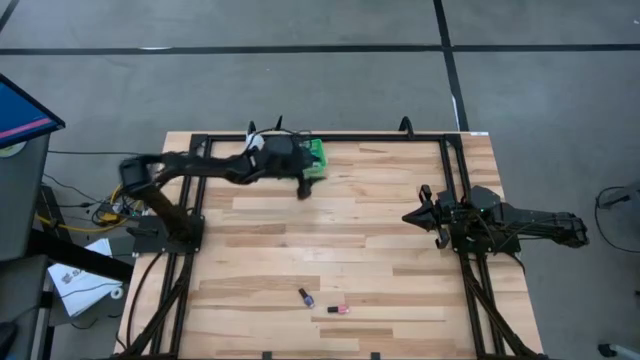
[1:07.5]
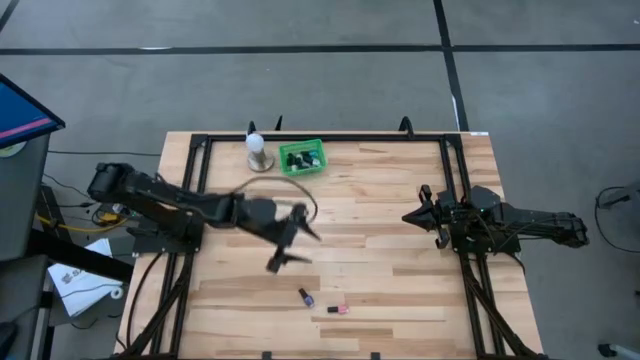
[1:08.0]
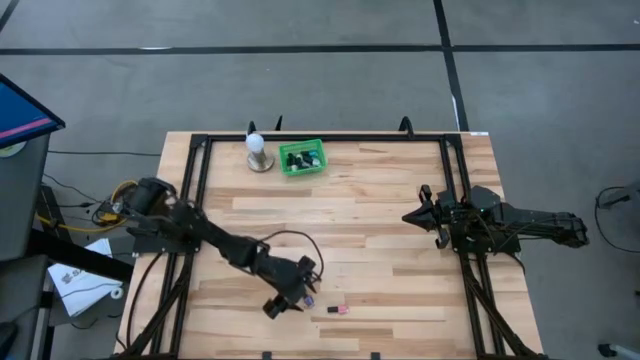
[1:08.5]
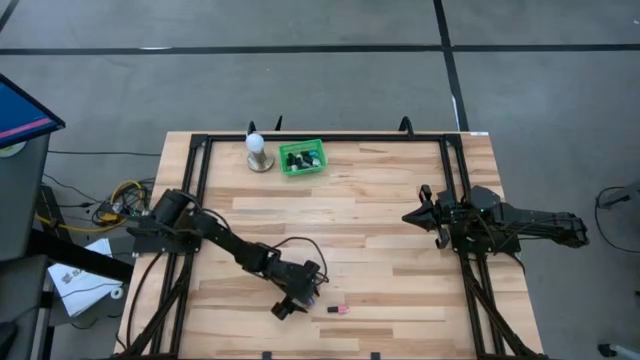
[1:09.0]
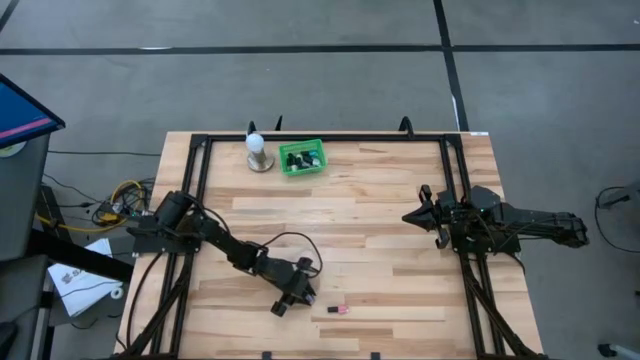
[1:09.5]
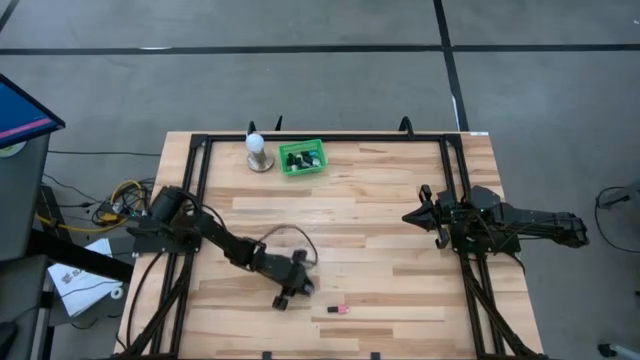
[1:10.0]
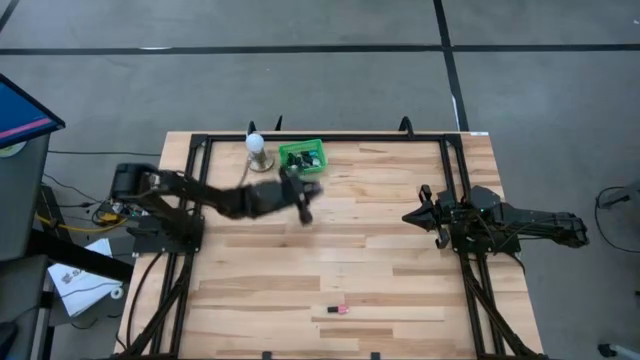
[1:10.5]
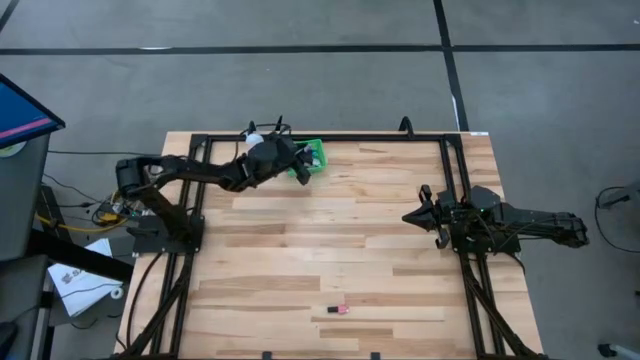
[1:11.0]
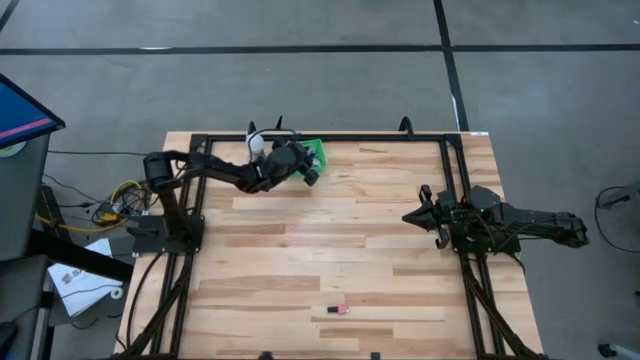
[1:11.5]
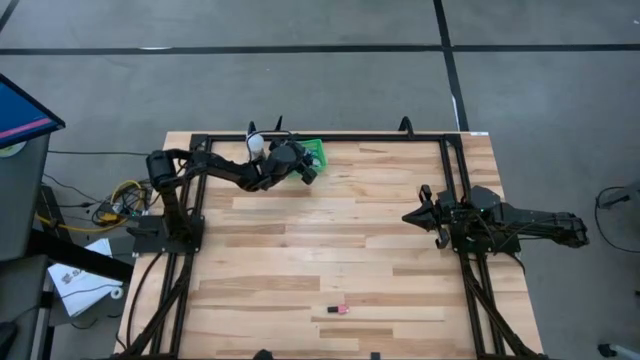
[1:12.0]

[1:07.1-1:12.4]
Task: Pick & Place Nail Polish
Put the violet nail polish into the green bin

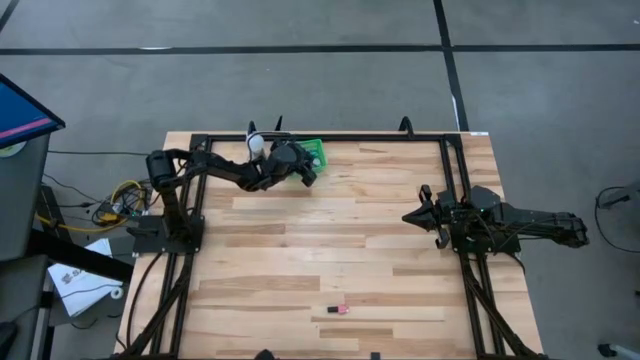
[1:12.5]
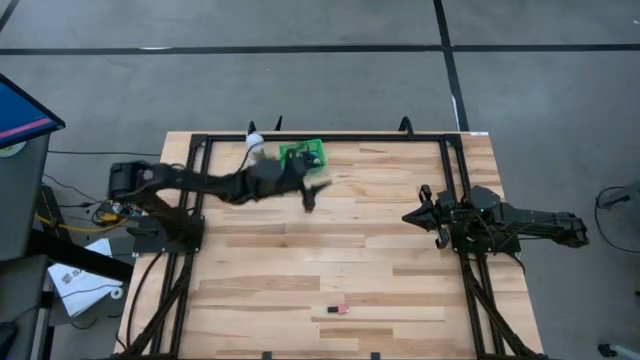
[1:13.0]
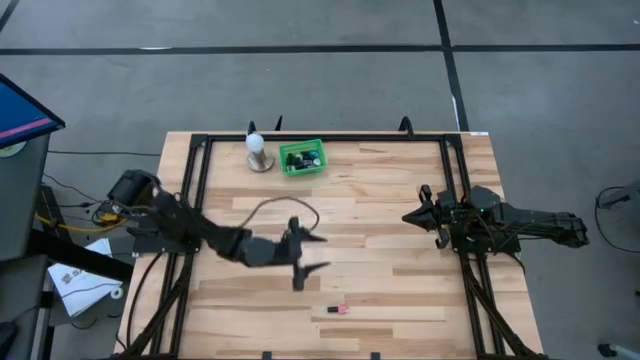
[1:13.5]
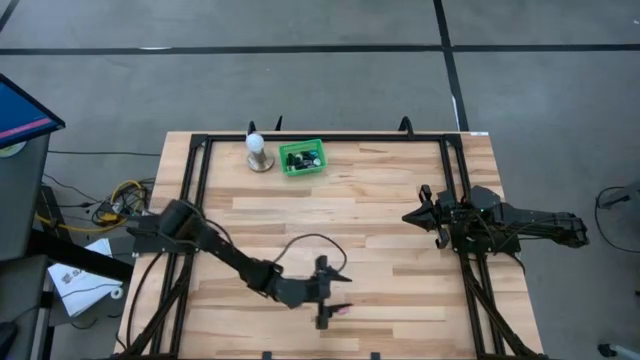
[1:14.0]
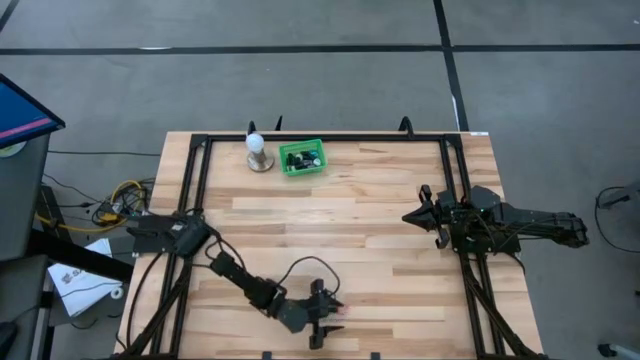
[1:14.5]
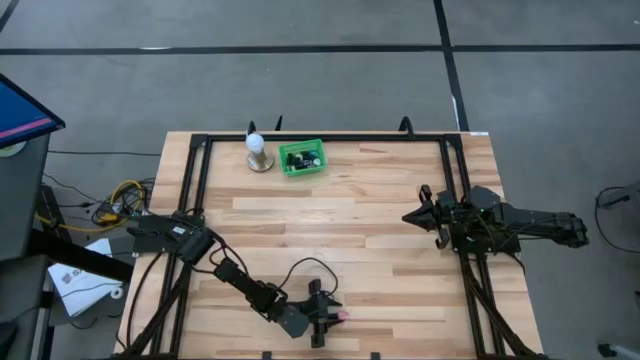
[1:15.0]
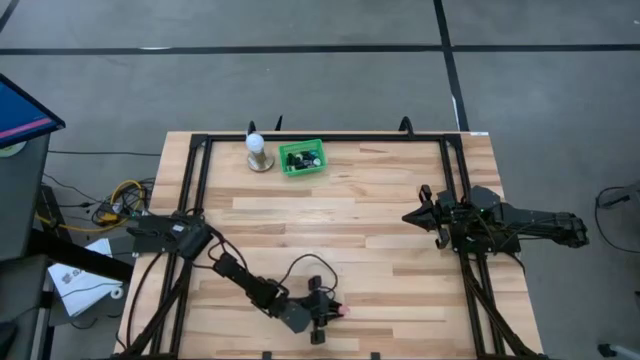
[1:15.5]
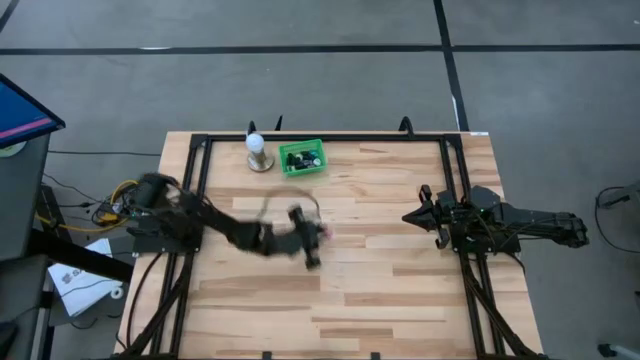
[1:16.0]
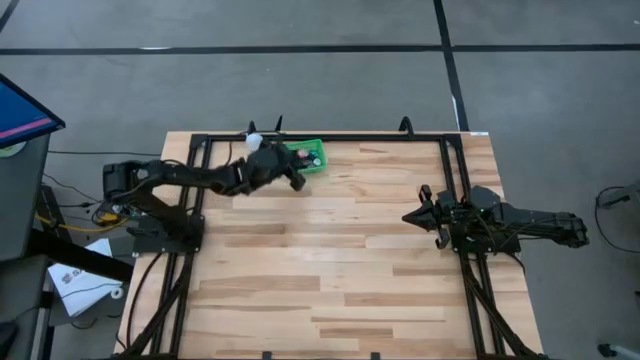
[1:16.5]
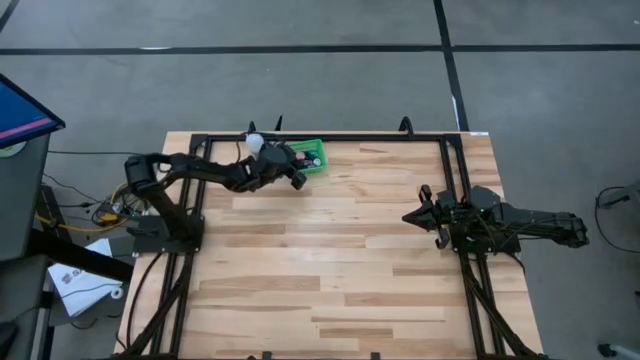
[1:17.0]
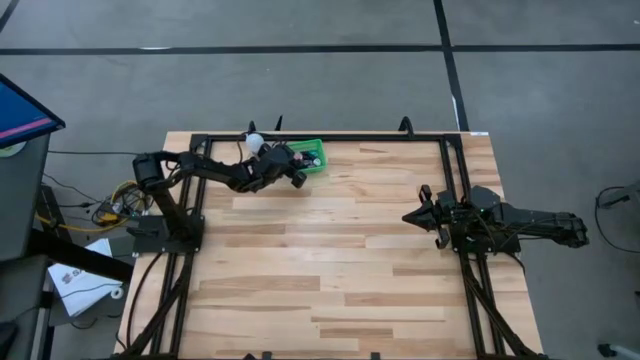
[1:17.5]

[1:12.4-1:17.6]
Put the pink nail polish into the green bin

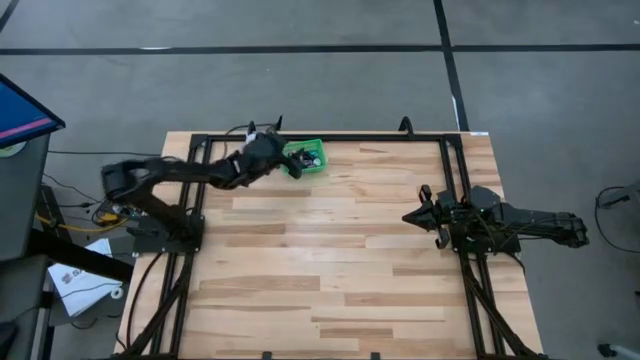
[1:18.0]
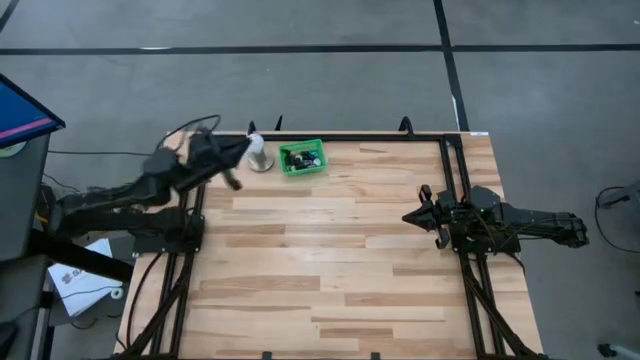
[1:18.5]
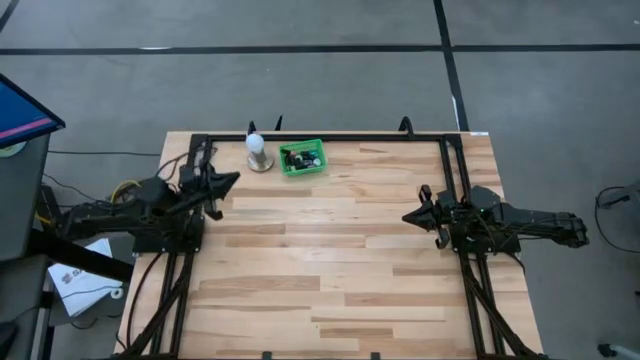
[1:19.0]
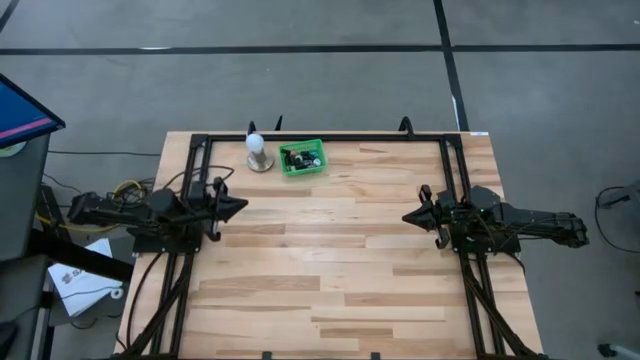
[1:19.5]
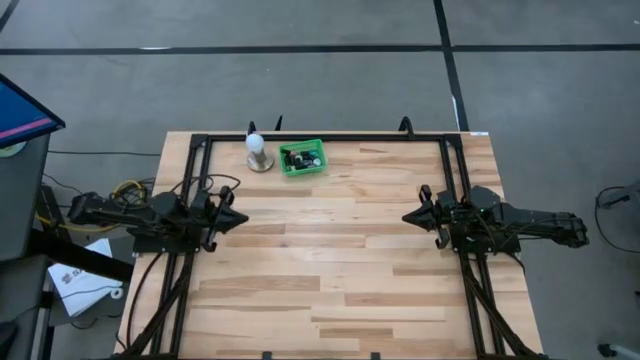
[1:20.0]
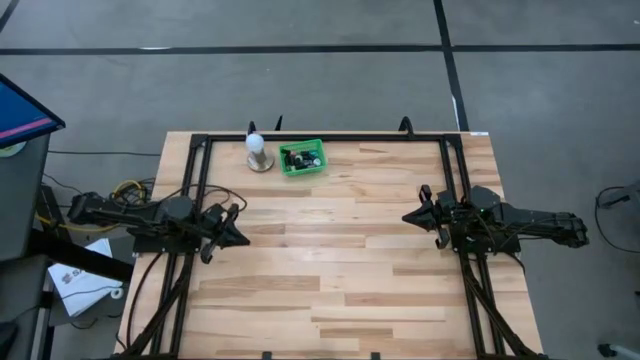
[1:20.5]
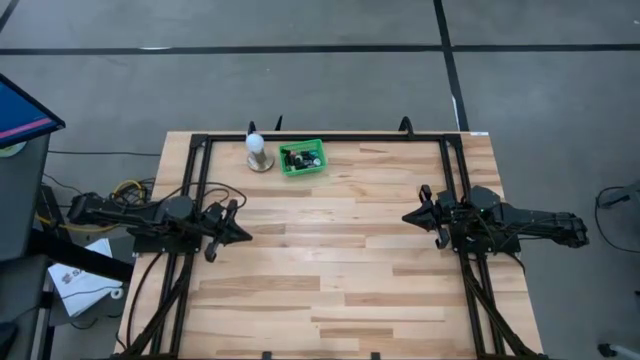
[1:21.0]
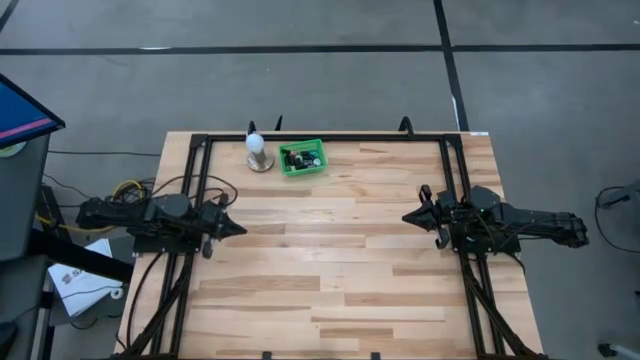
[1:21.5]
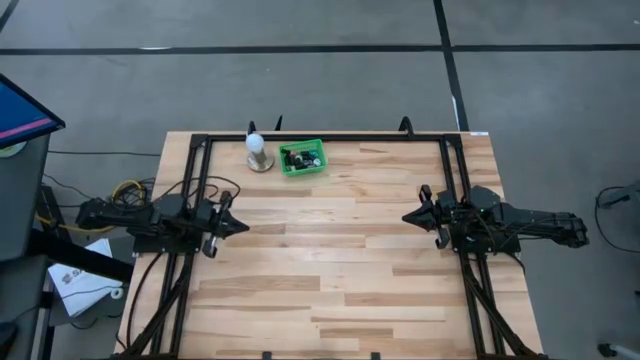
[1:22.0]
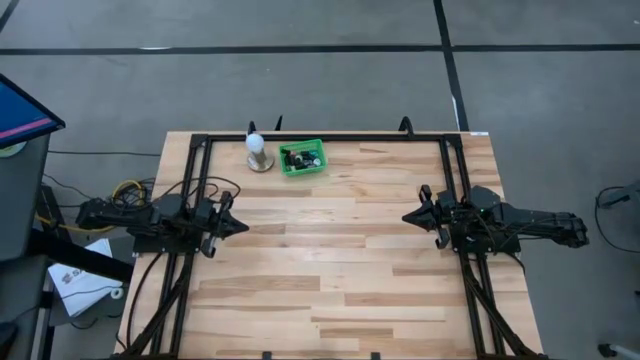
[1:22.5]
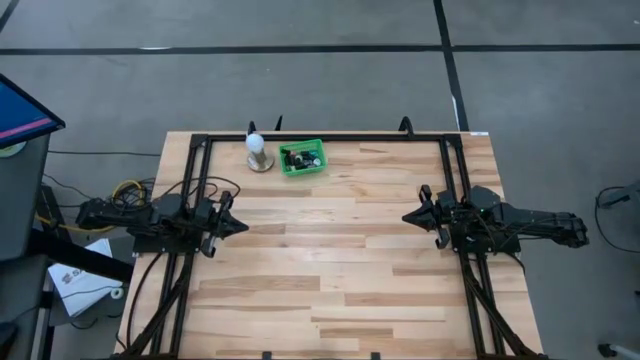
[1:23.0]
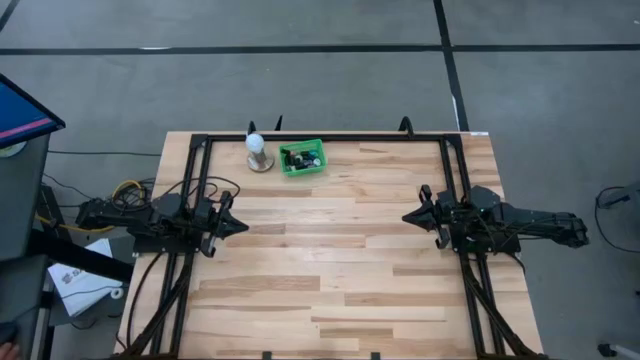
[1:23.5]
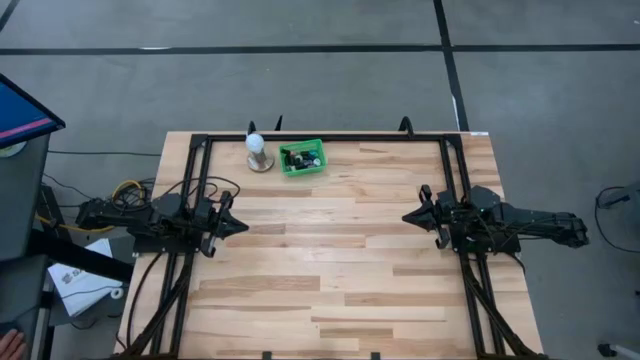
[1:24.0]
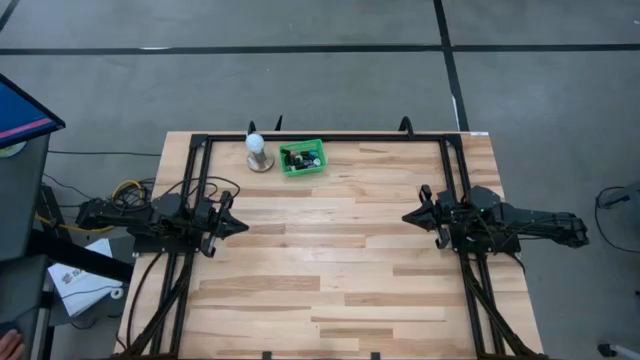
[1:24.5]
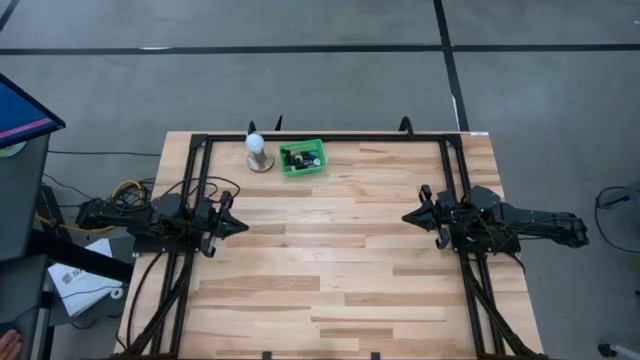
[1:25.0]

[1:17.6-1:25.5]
Return to home position

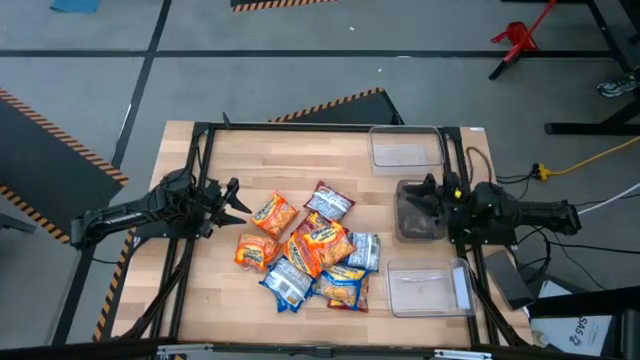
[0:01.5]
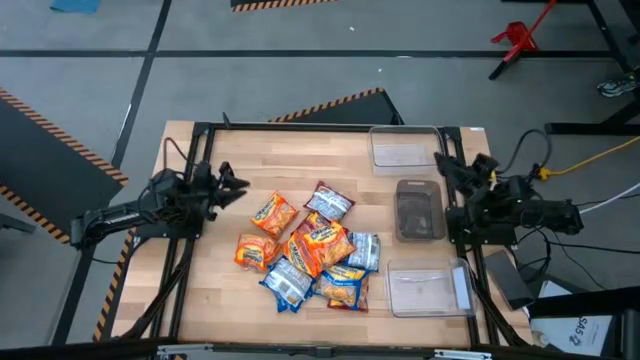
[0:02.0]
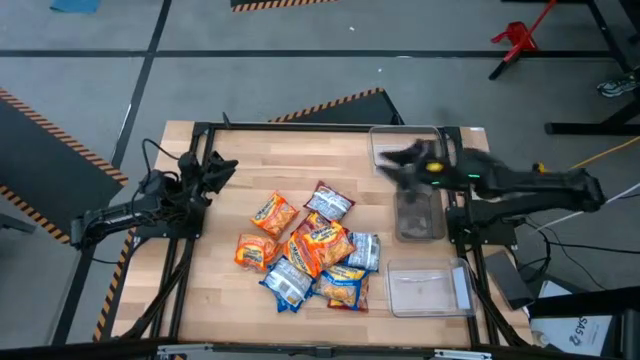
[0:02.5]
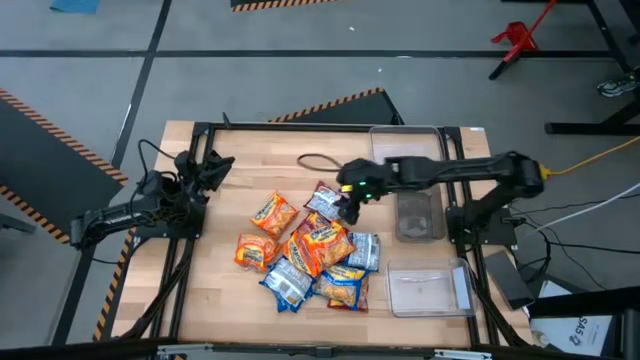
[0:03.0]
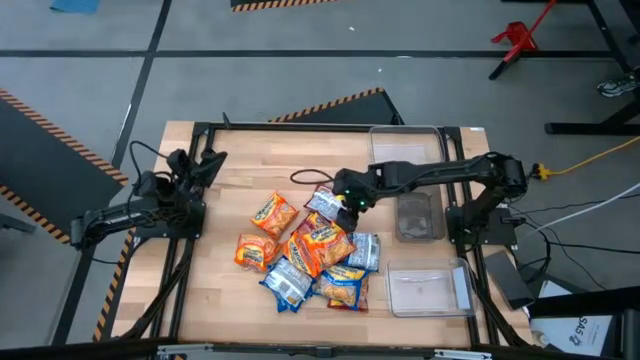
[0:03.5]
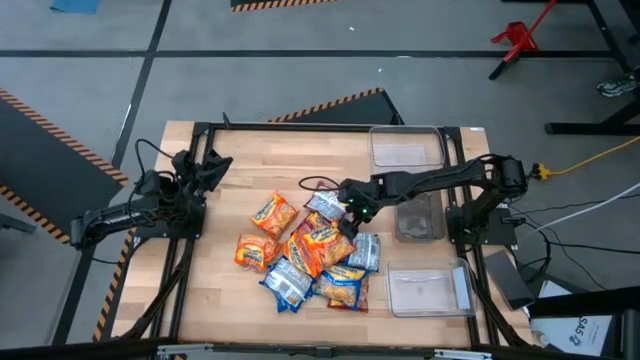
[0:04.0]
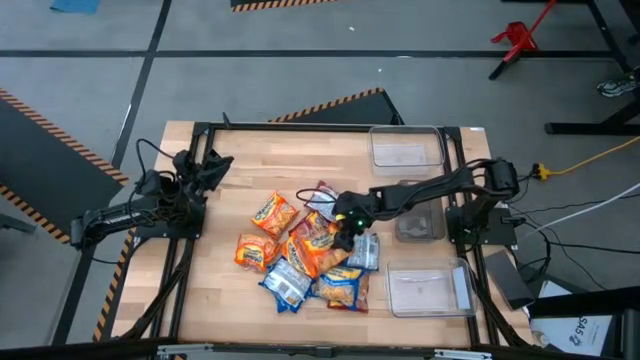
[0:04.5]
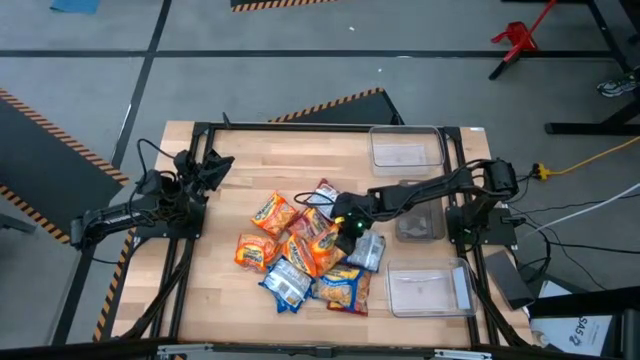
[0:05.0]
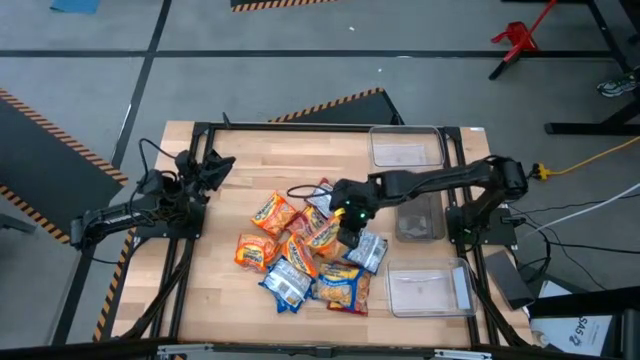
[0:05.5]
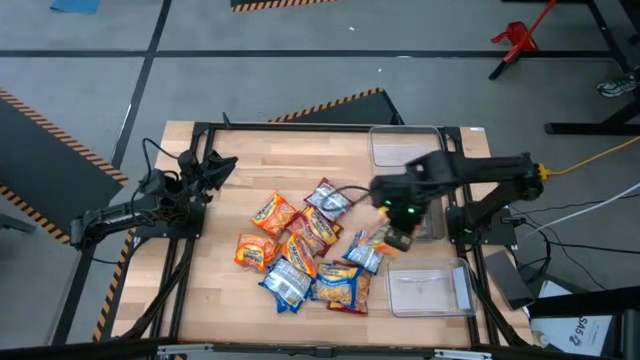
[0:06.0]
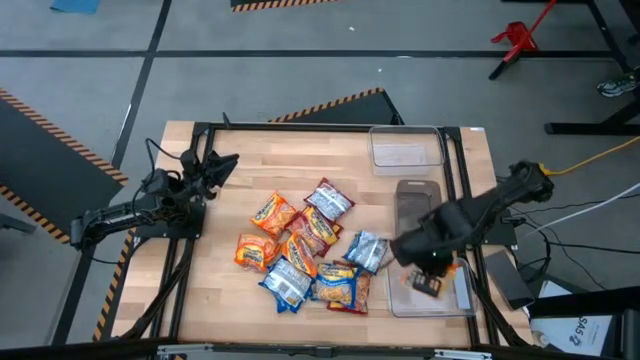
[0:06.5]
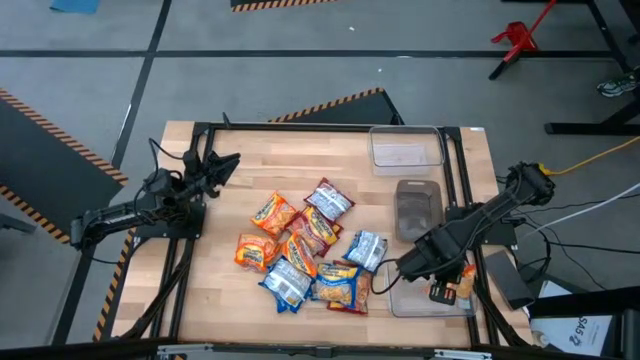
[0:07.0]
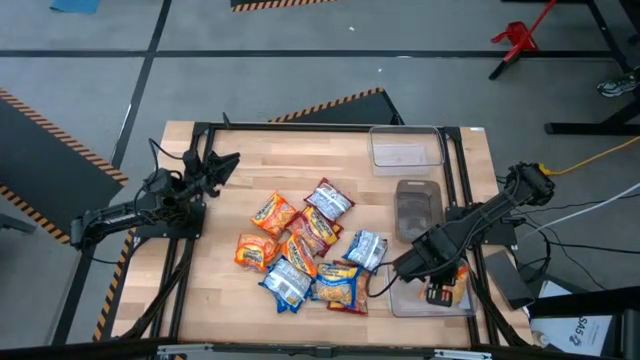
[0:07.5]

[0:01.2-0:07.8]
Task: Sort Maruchan noodles
Put the orange noodle pack into the bottom transparent bin
